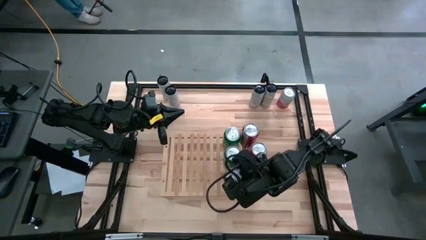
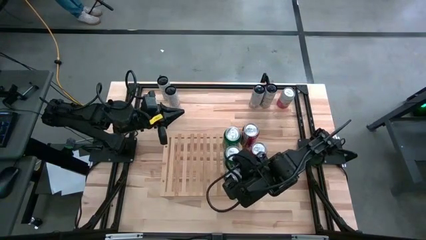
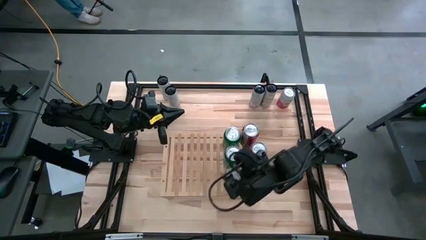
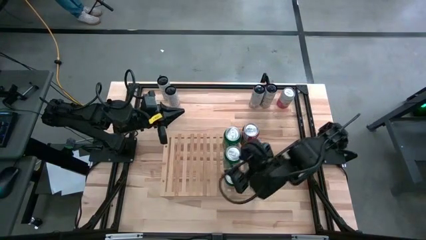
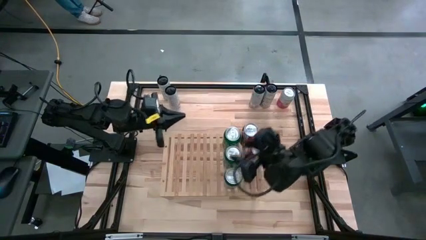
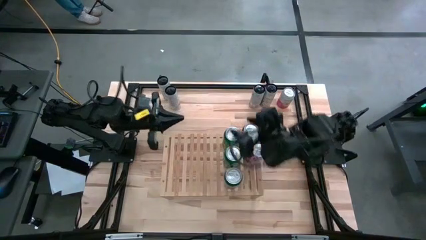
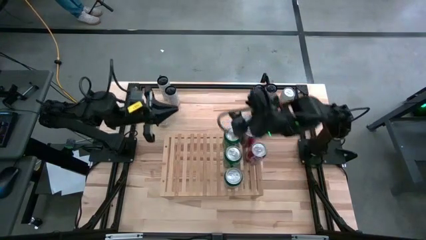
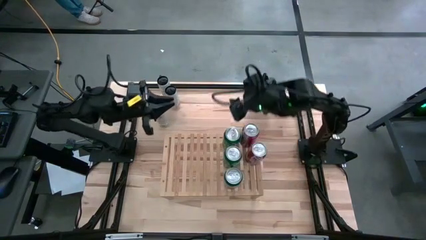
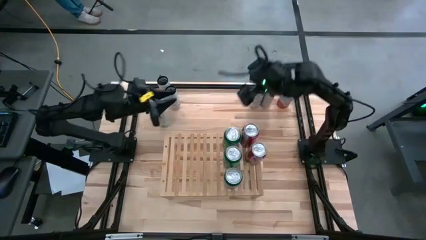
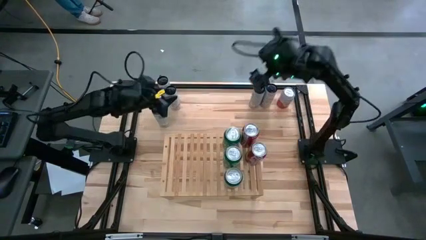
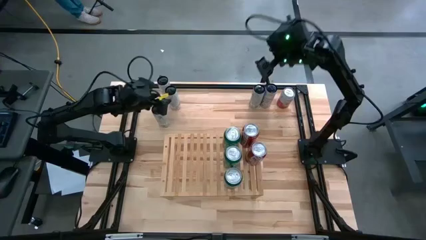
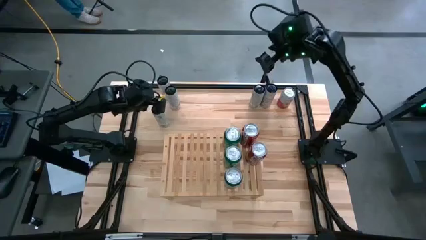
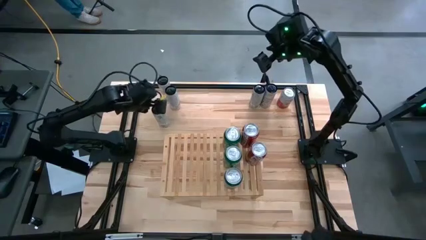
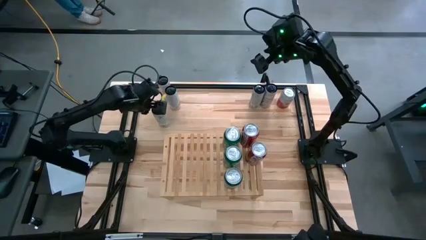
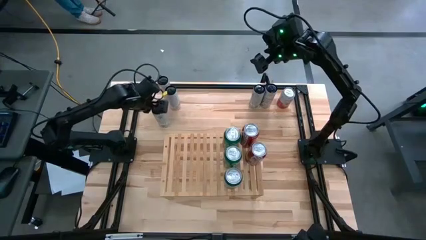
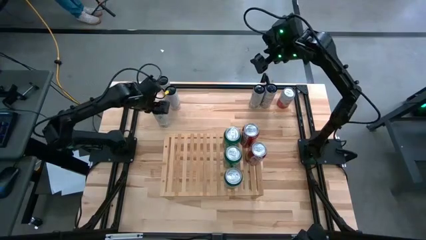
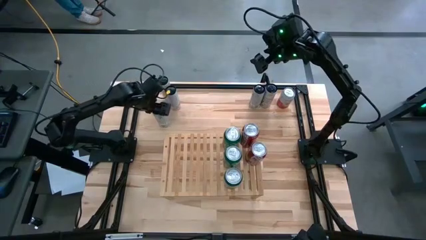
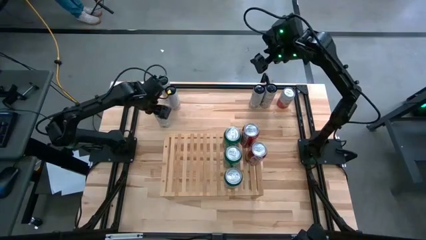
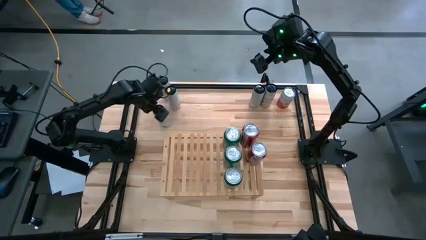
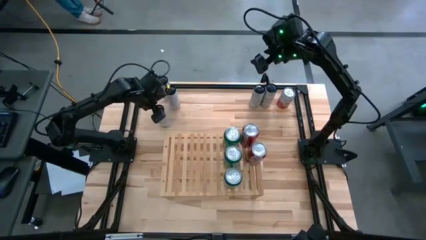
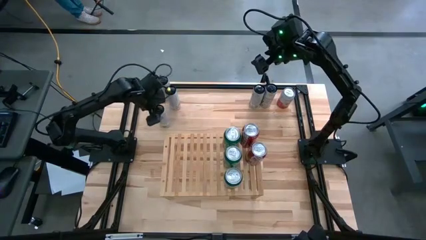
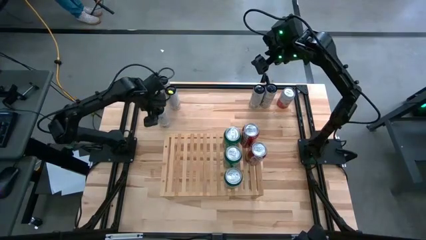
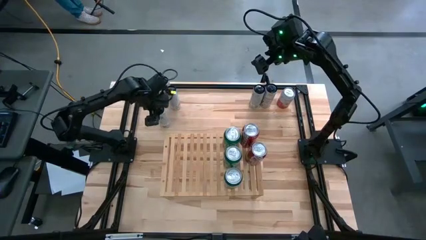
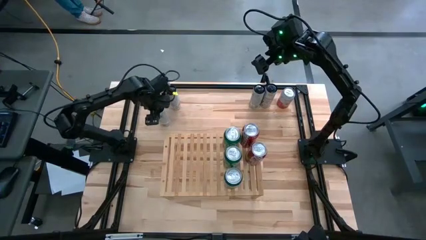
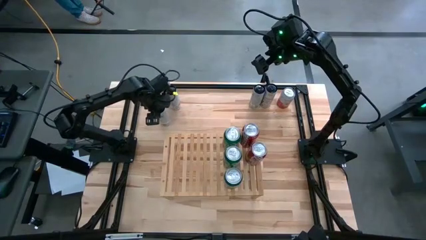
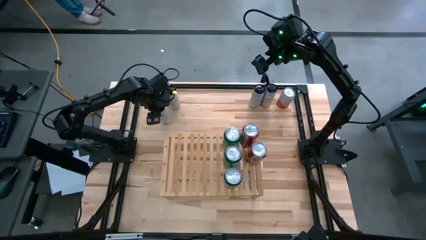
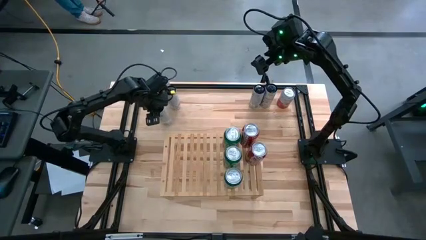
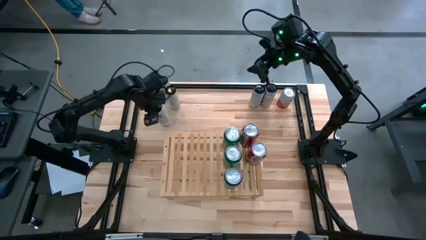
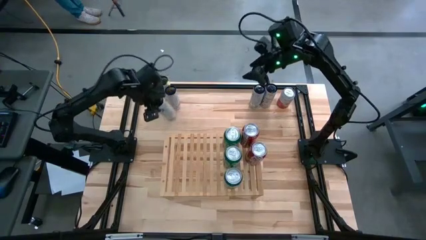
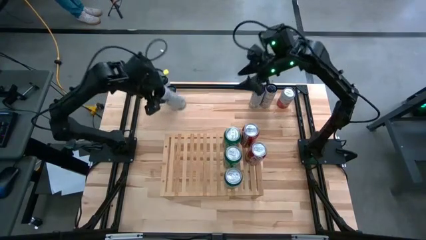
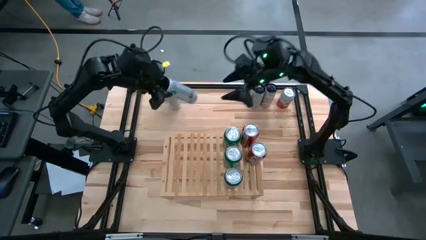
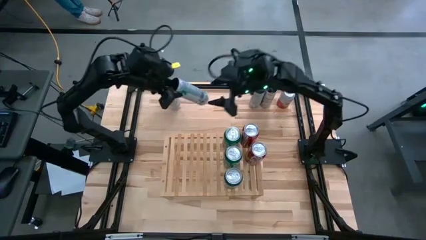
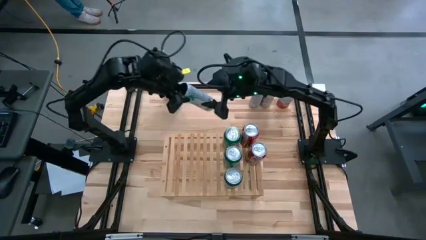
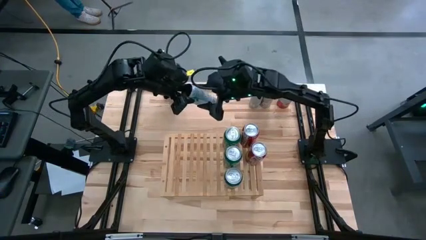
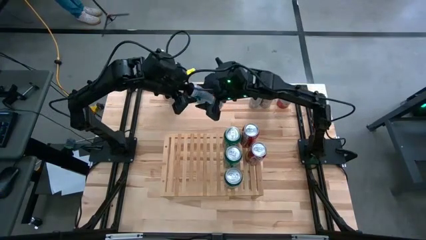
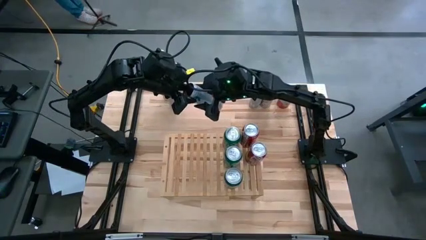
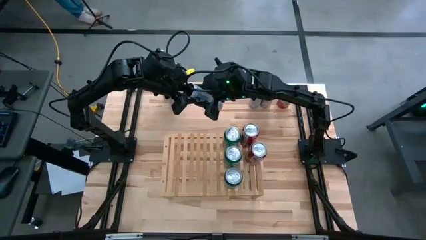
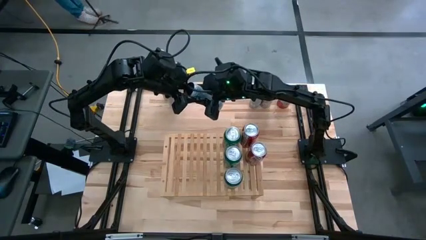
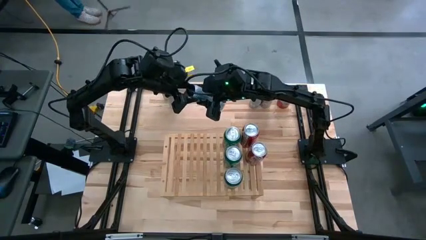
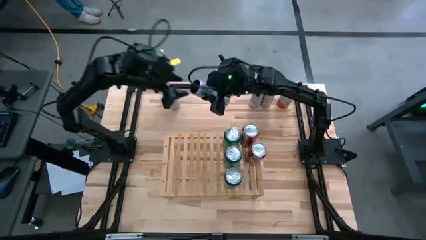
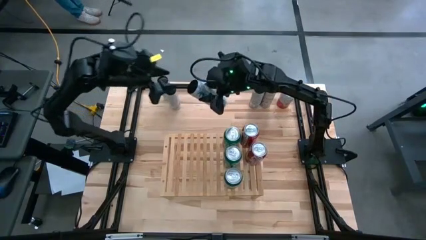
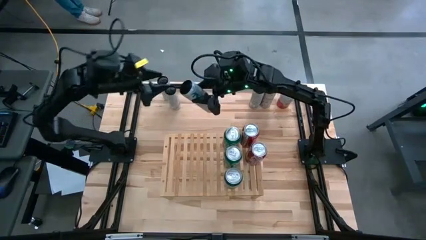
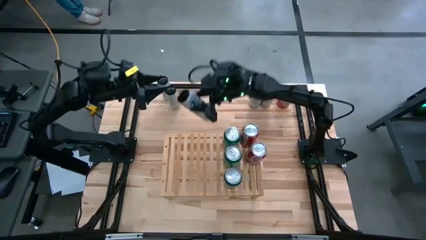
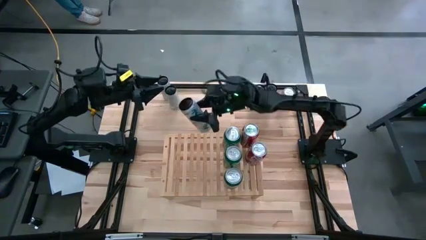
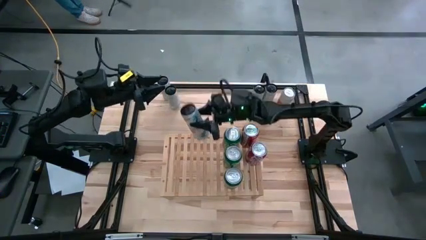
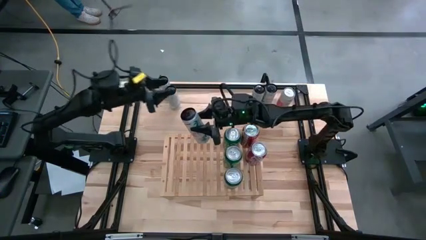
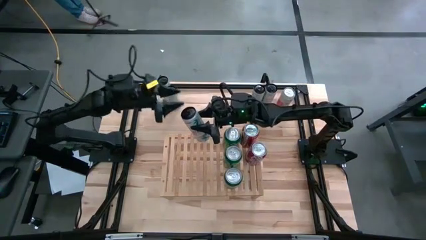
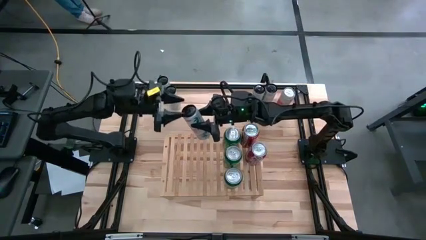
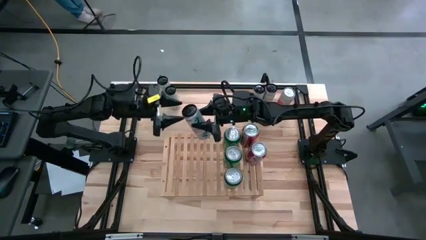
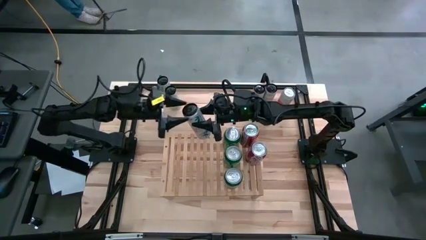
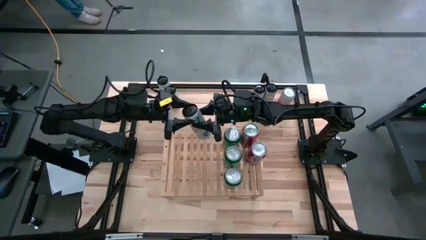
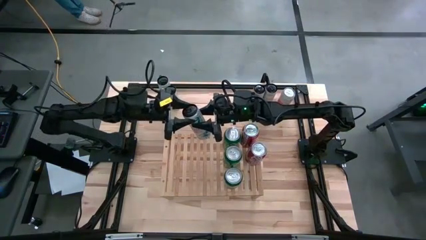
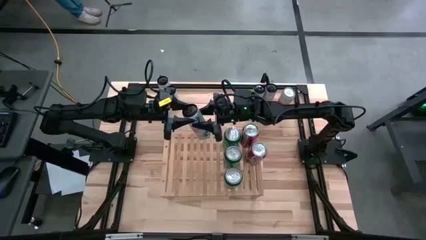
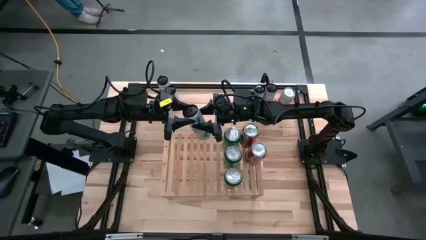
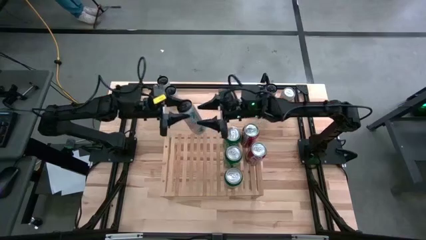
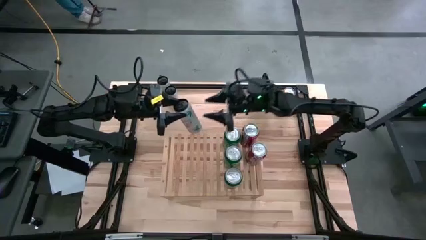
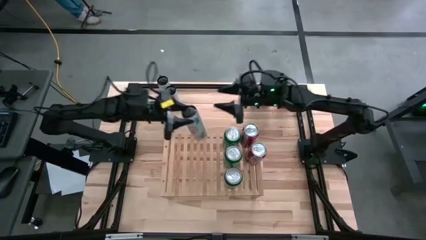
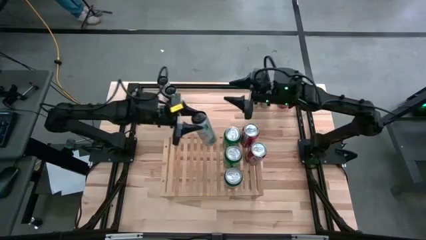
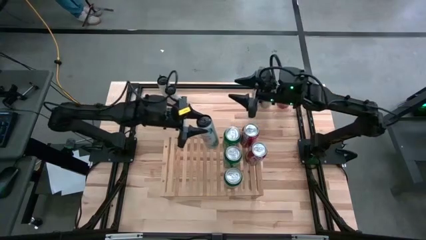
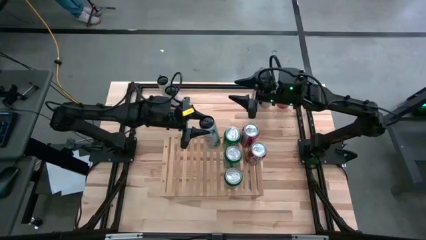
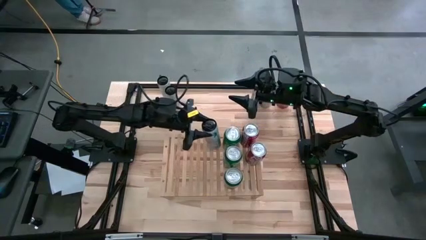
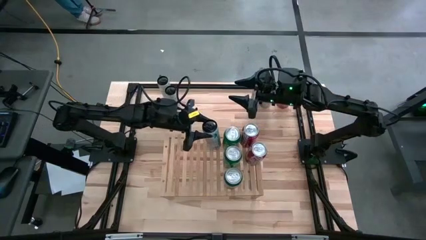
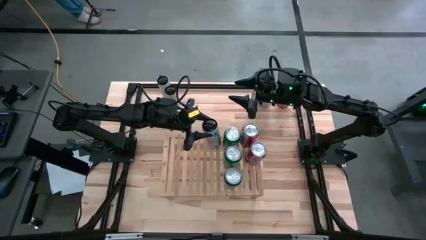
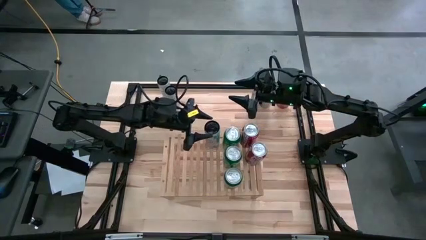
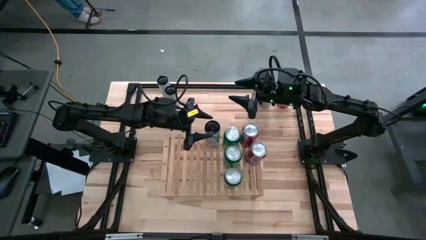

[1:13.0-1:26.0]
Task: Place canned beverage on shelf
Put the bottom left white-pink soda can on the shelf

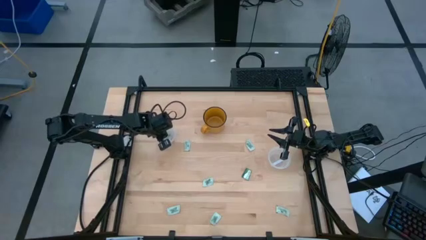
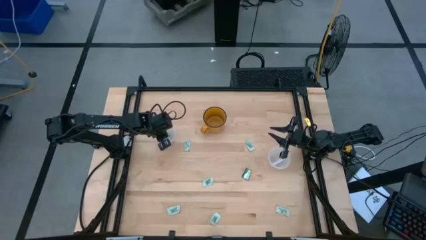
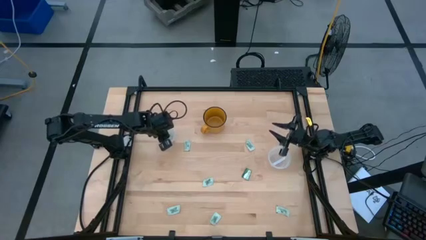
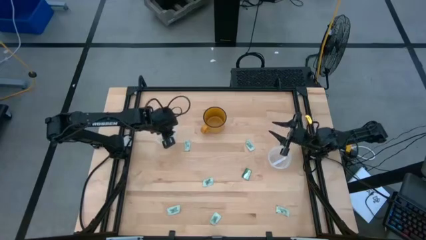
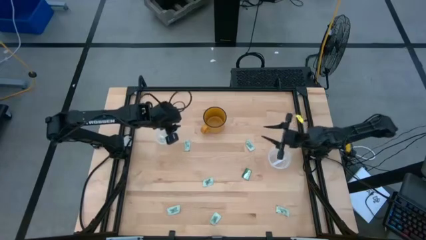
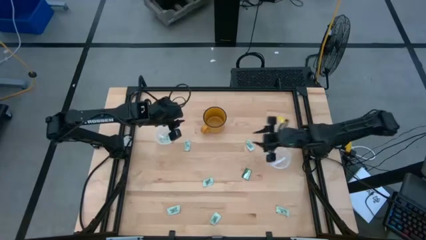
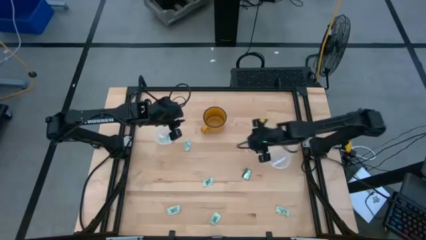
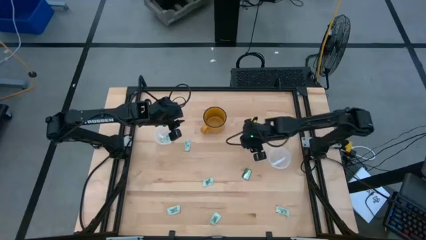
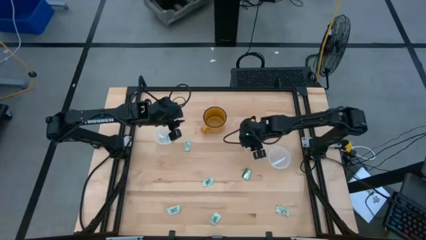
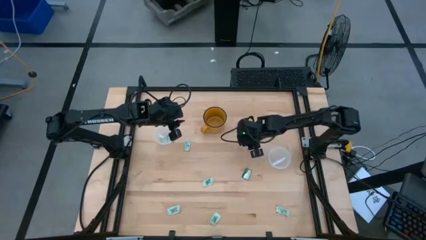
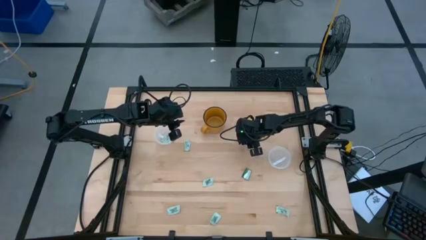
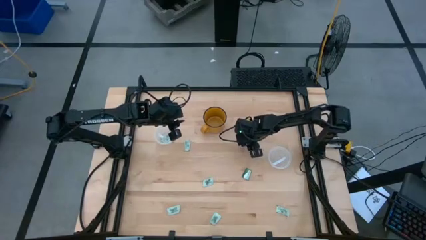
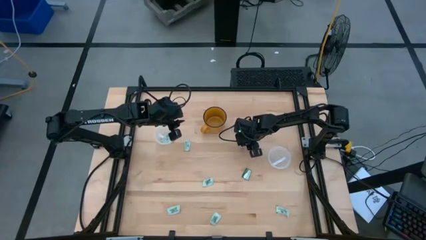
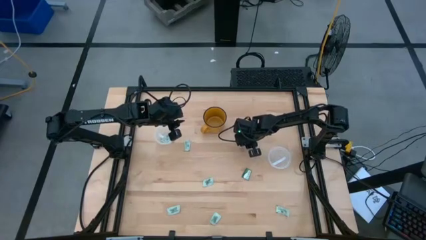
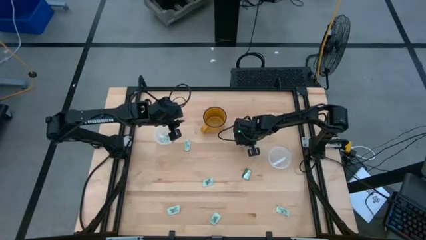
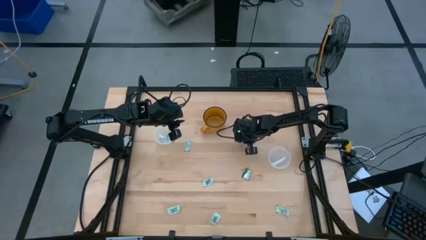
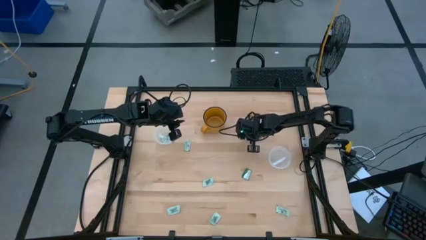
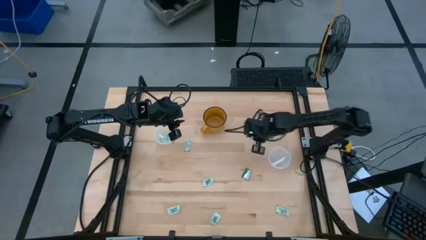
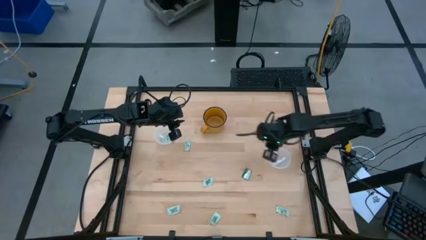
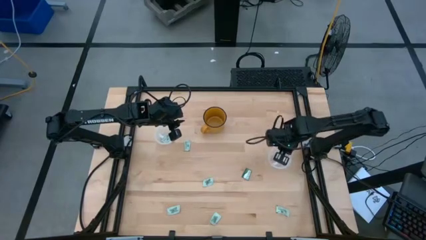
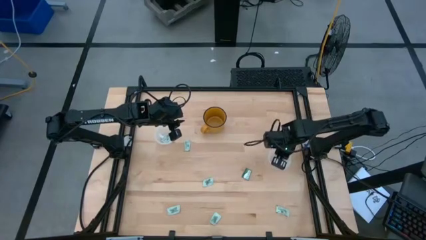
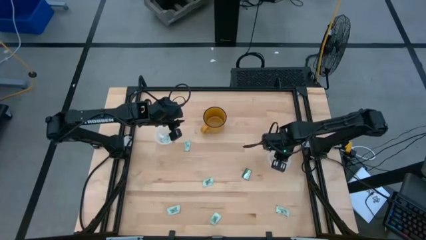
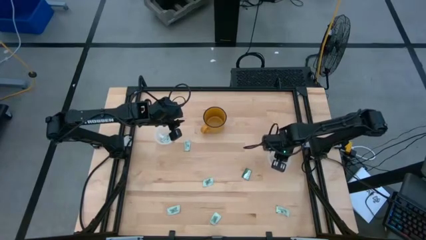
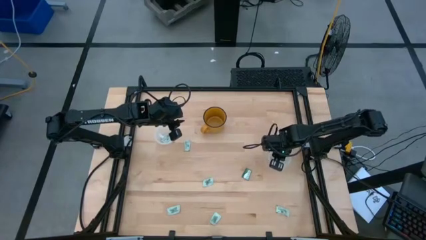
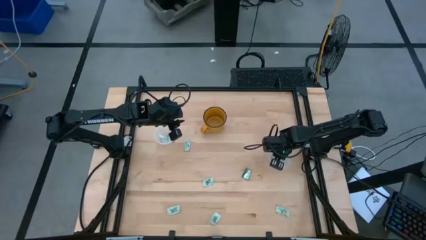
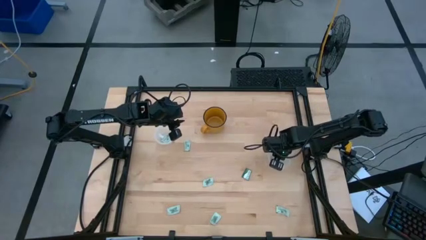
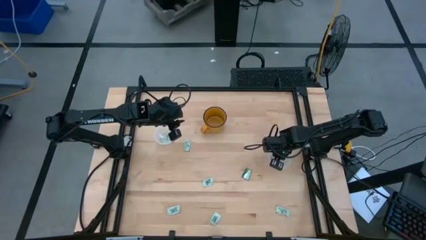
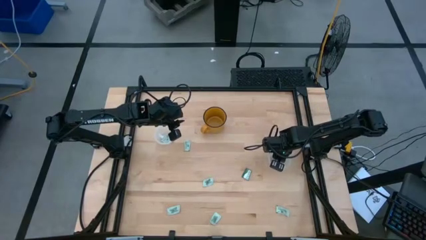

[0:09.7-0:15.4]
Task: Pick and place Stevia / Truvia into bins
Put the light green stevia packet into the right transparent container
